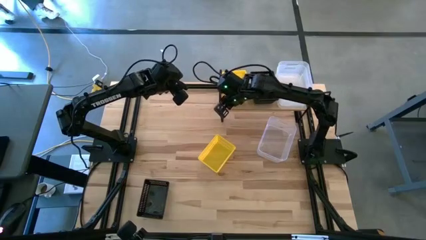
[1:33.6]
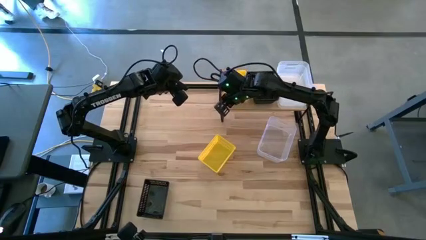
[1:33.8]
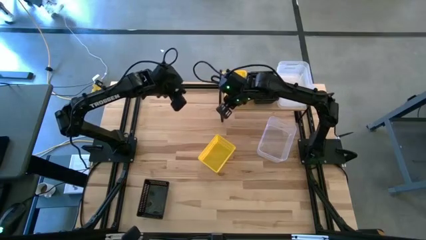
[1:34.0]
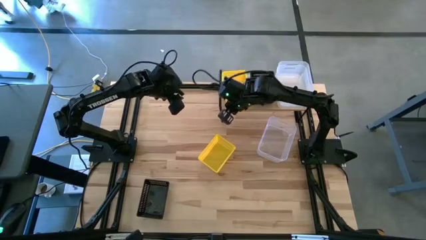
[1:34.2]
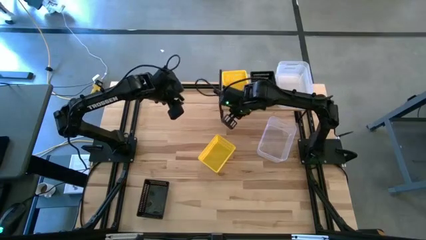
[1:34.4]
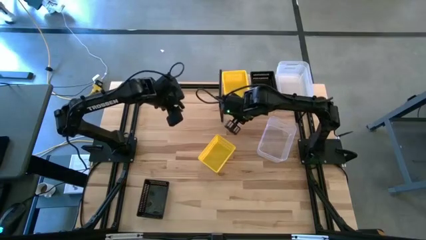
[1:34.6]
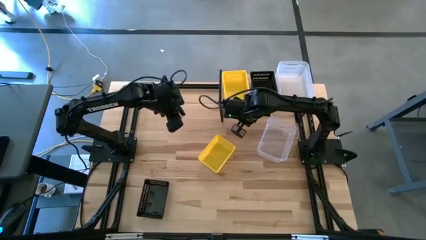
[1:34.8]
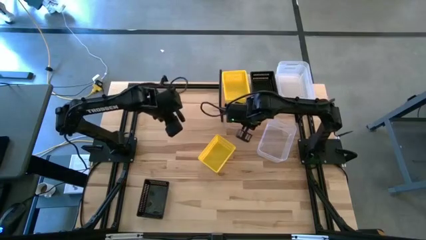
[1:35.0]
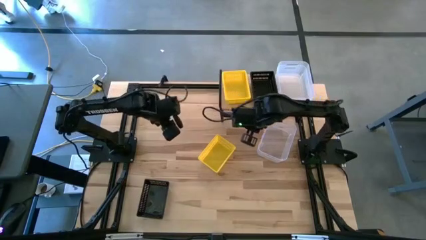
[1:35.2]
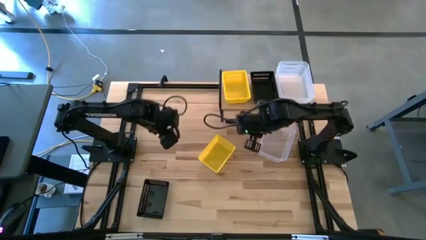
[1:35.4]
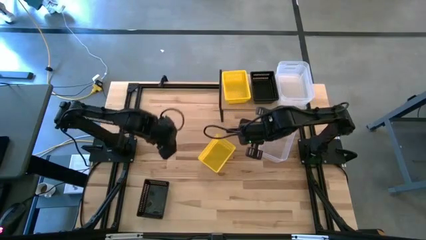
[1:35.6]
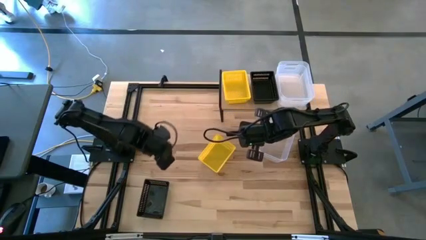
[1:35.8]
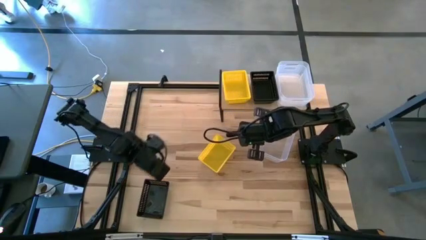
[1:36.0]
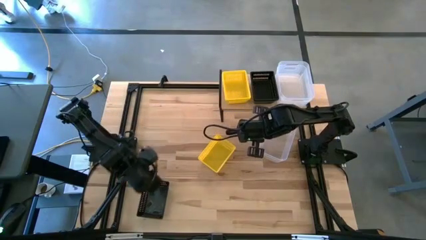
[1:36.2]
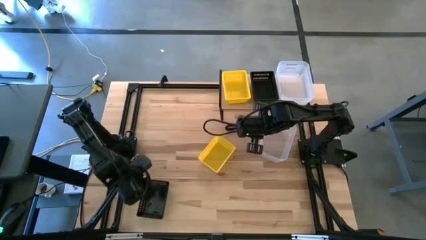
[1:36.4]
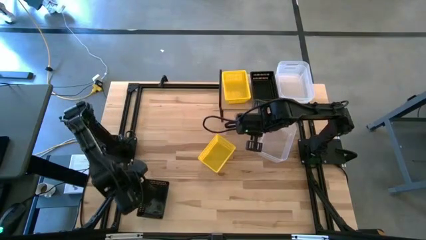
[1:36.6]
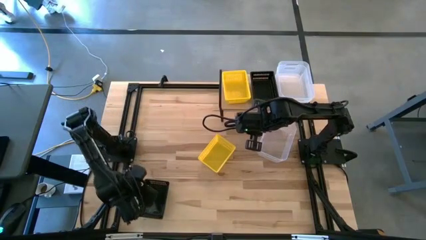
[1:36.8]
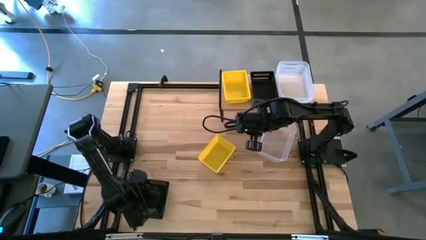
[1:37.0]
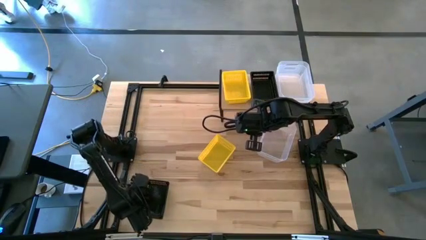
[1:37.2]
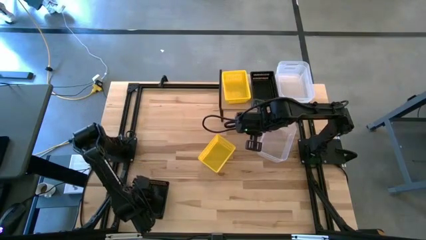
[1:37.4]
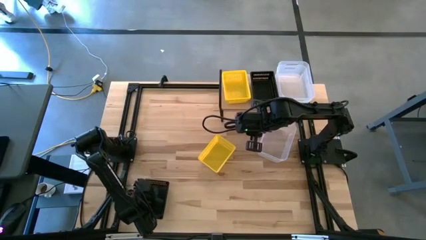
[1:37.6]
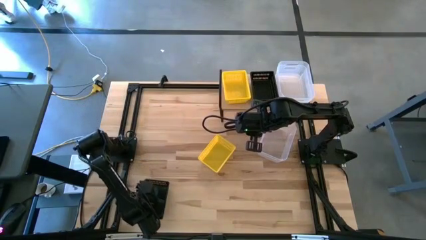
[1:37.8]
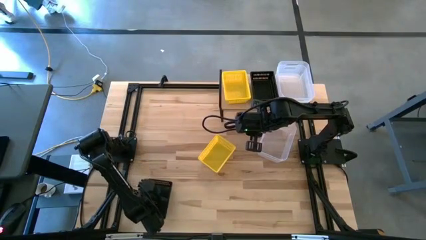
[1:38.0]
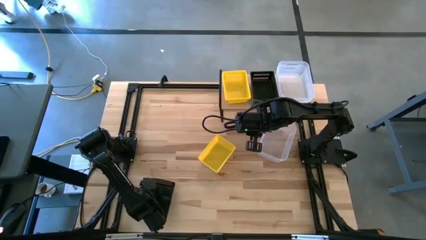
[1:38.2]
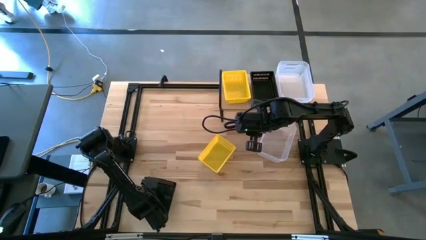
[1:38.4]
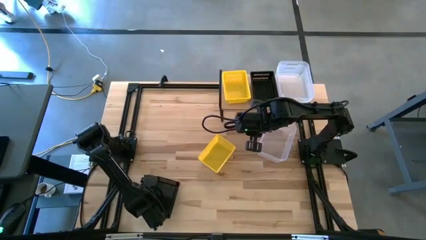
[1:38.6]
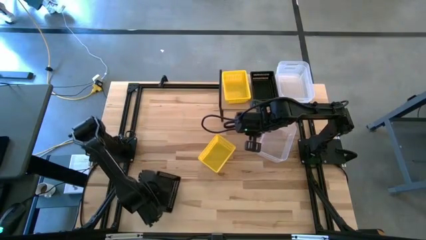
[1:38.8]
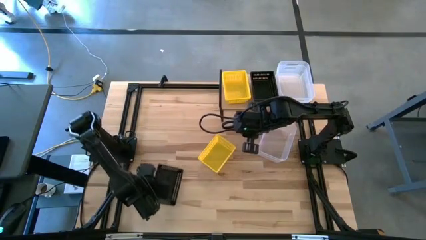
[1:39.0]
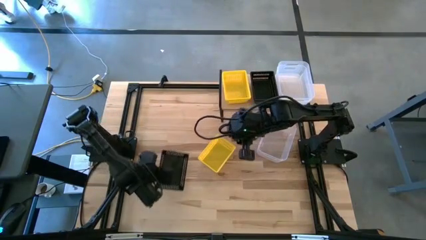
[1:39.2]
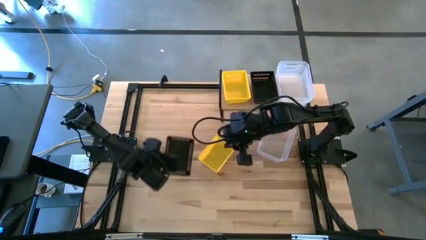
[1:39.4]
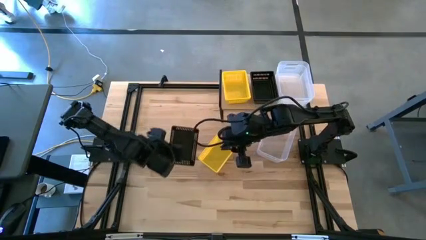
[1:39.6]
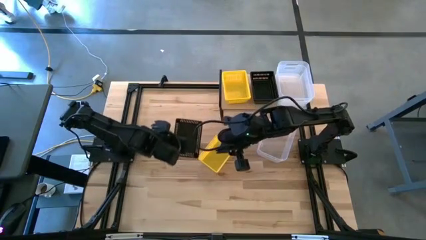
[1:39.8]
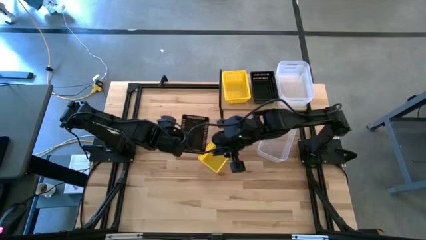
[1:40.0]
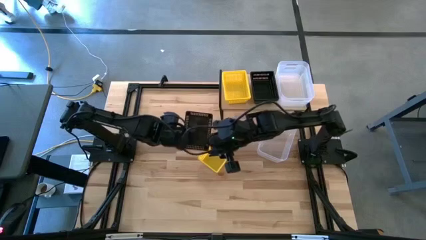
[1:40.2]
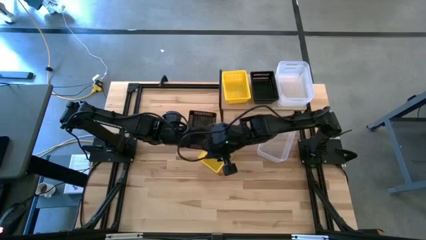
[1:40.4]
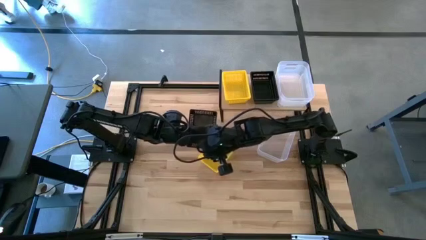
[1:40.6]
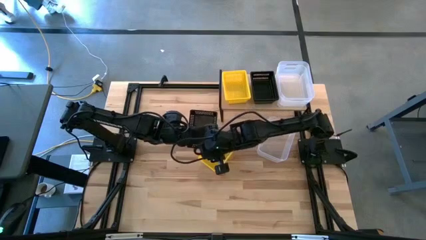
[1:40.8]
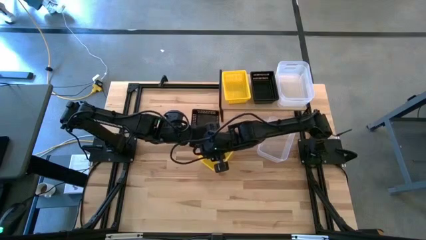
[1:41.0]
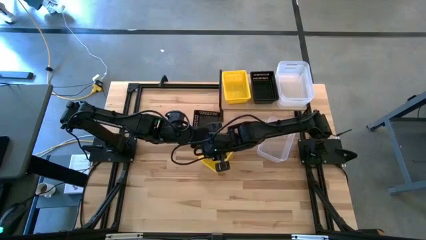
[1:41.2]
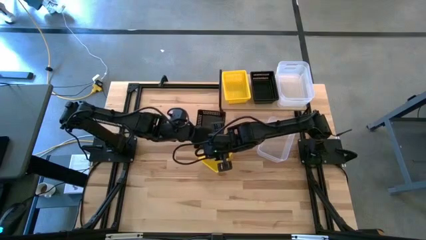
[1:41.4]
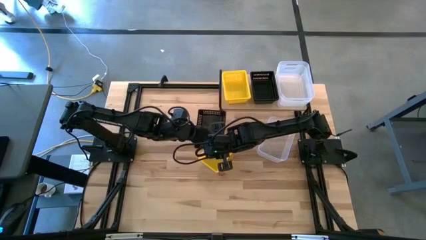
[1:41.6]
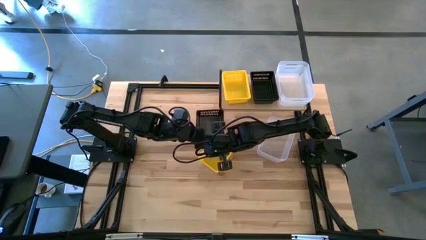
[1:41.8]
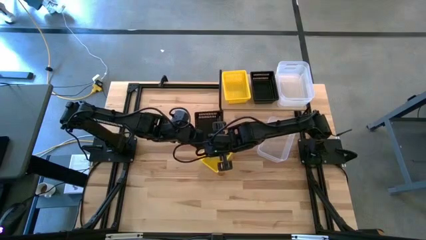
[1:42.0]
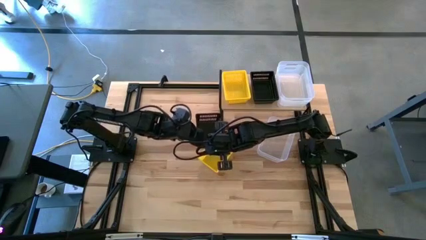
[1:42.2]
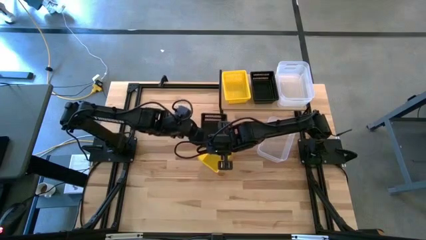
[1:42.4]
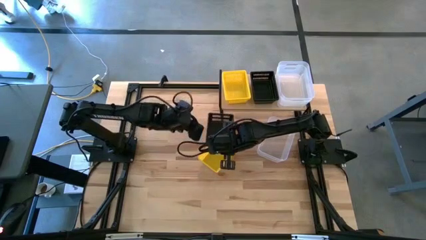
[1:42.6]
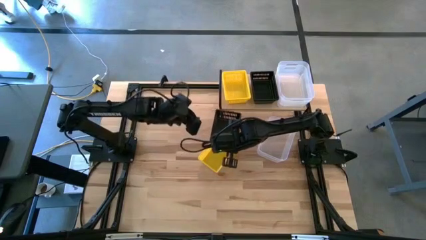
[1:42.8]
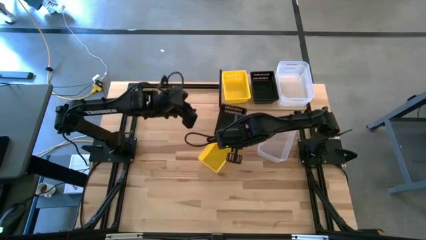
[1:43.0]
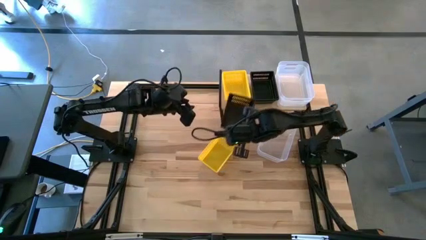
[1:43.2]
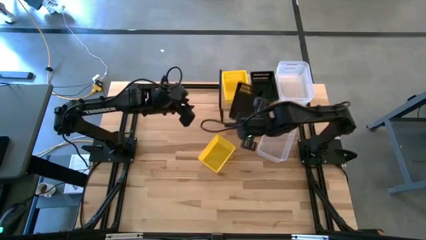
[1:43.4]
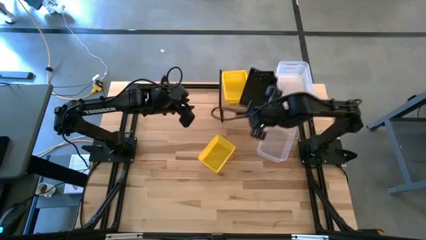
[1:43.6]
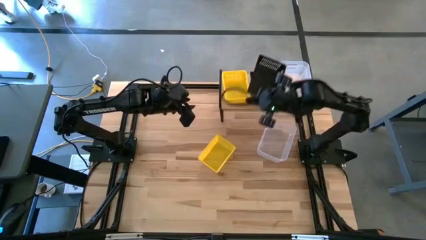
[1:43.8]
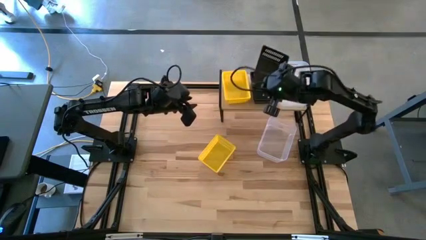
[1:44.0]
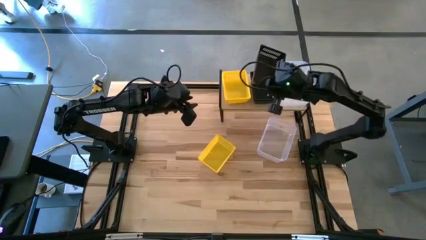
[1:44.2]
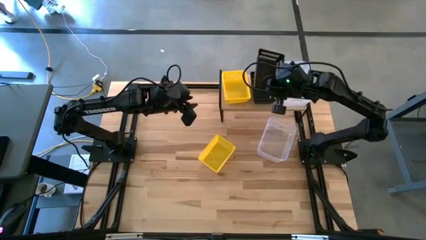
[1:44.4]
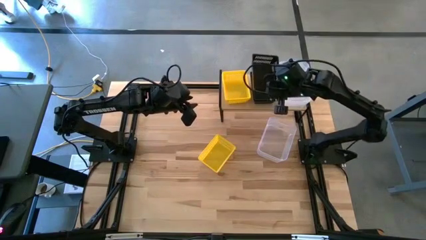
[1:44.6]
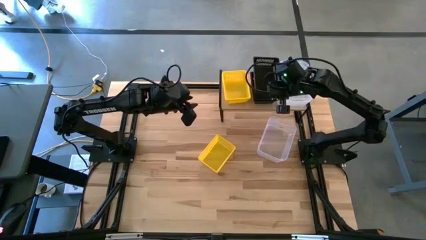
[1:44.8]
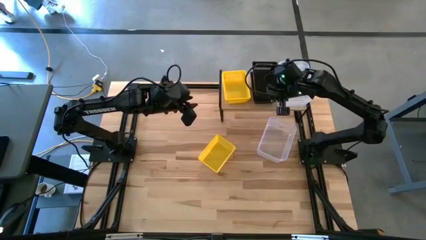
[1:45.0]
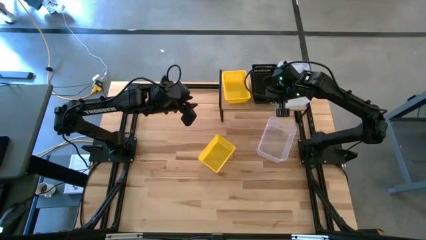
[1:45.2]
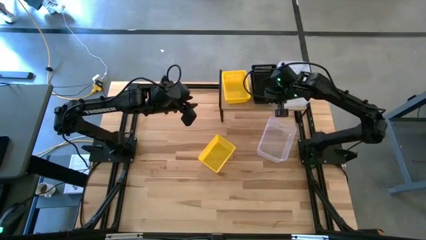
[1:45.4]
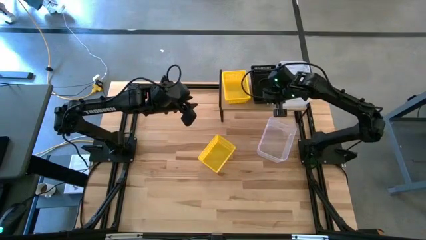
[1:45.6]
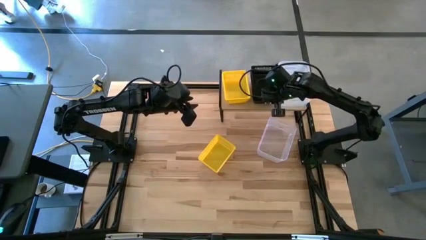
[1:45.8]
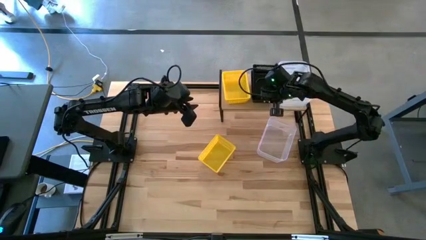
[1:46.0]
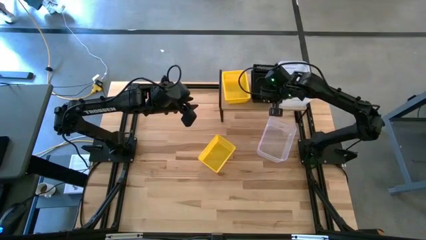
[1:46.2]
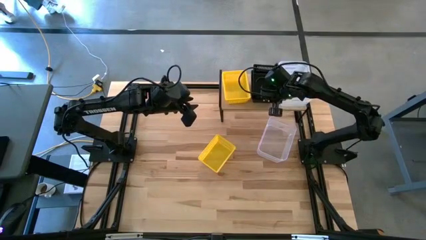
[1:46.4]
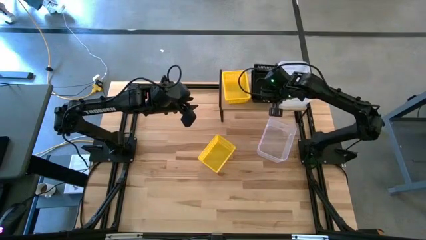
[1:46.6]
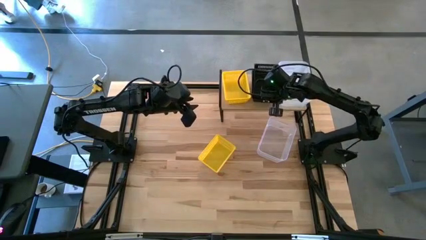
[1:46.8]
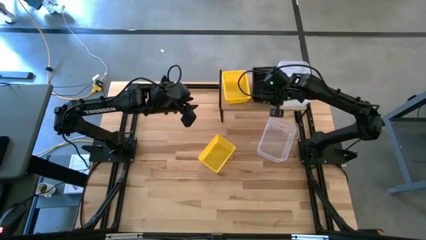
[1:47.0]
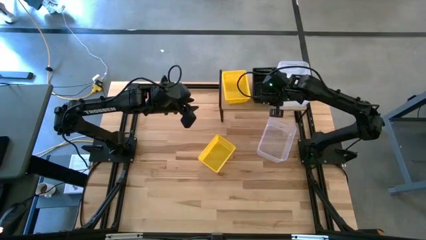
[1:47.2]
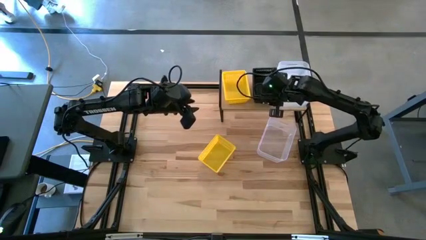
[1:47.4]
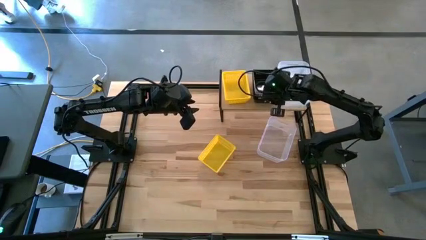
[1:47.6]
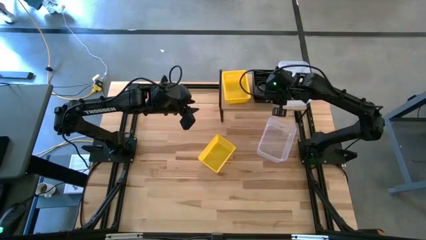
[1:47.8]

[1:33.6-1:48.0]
Task: Stack baskets on shelf by color
Stack the black bin on top of the other stacked black bins on the shelf
